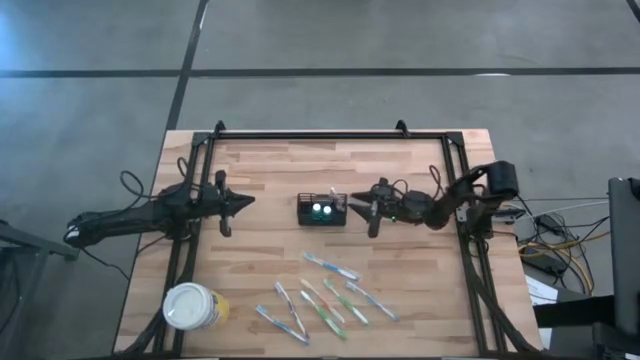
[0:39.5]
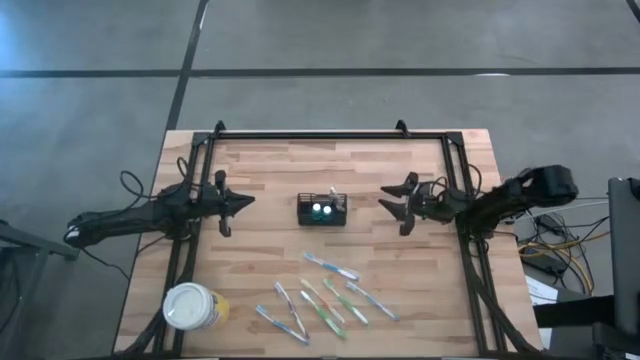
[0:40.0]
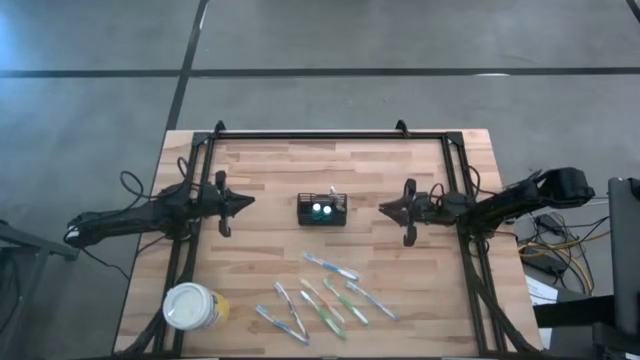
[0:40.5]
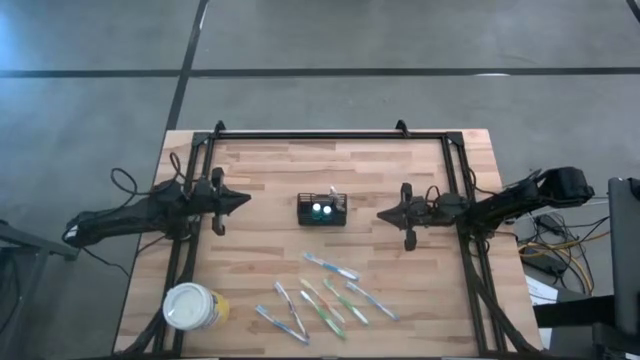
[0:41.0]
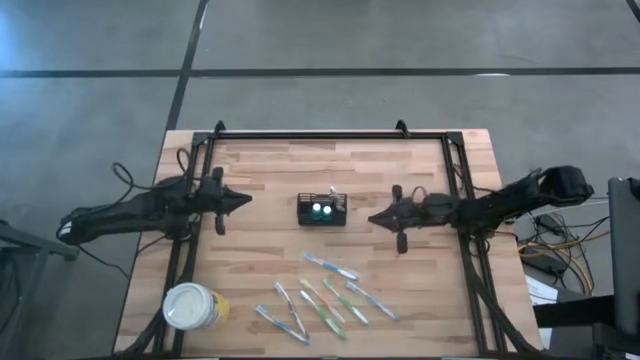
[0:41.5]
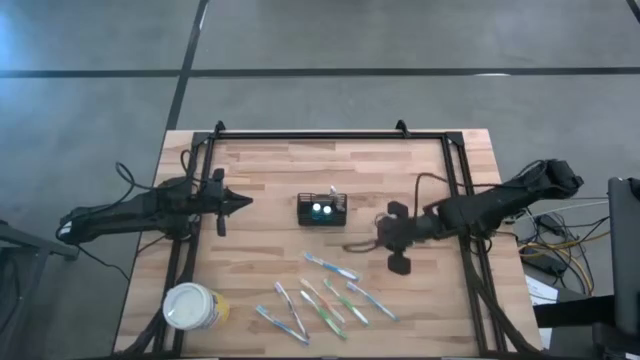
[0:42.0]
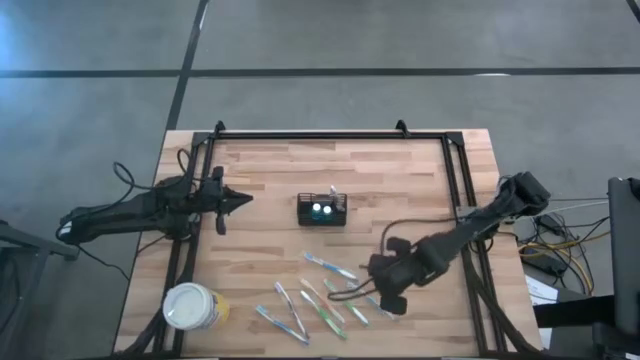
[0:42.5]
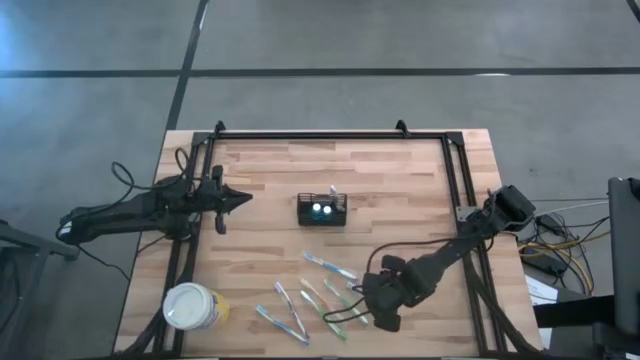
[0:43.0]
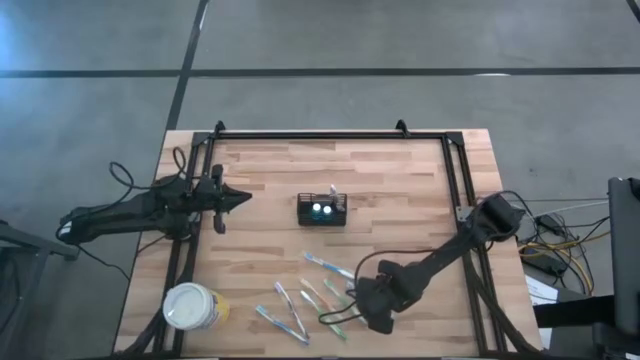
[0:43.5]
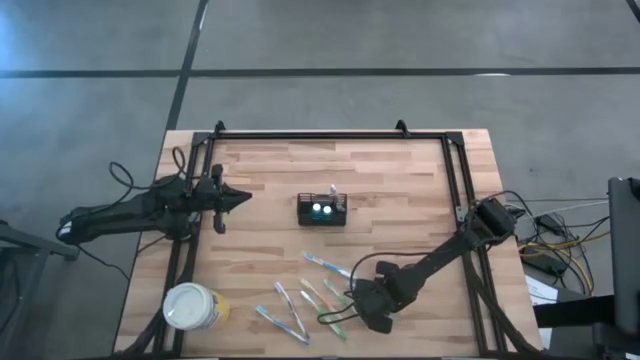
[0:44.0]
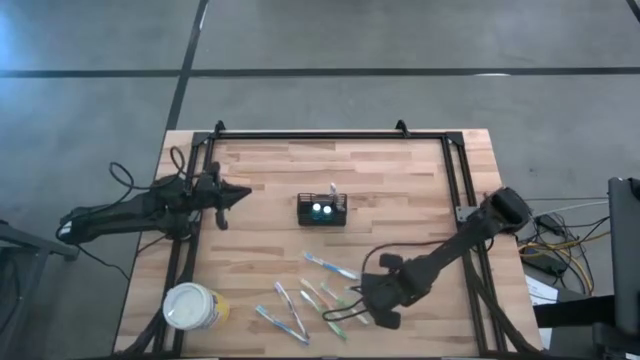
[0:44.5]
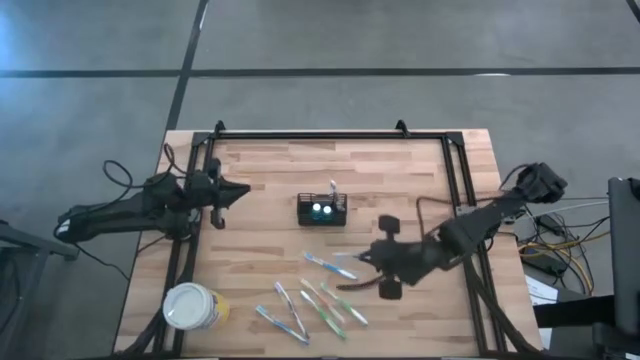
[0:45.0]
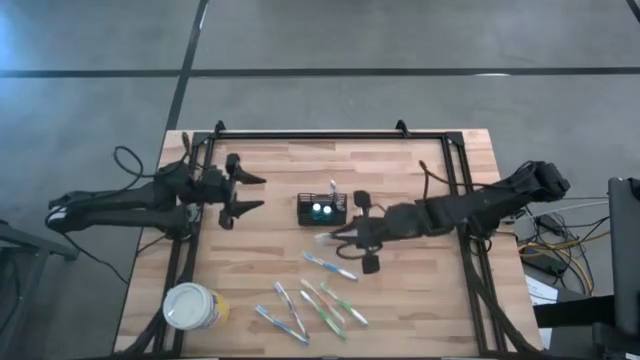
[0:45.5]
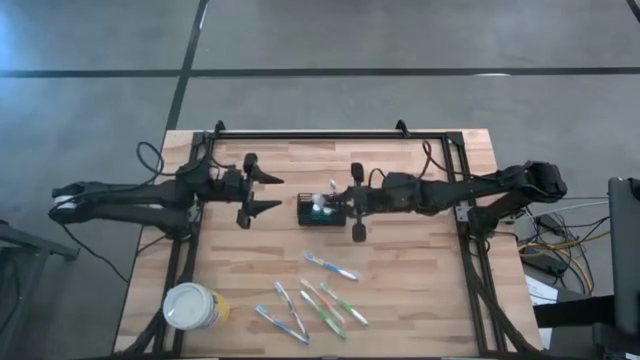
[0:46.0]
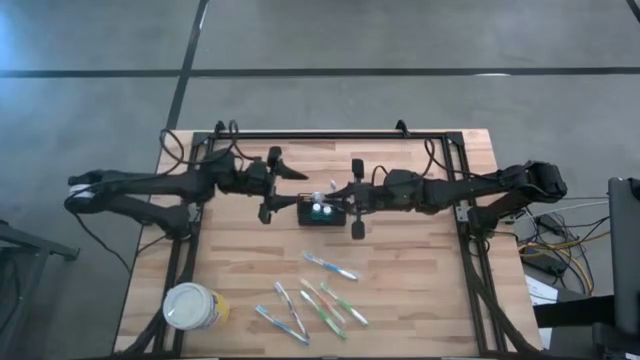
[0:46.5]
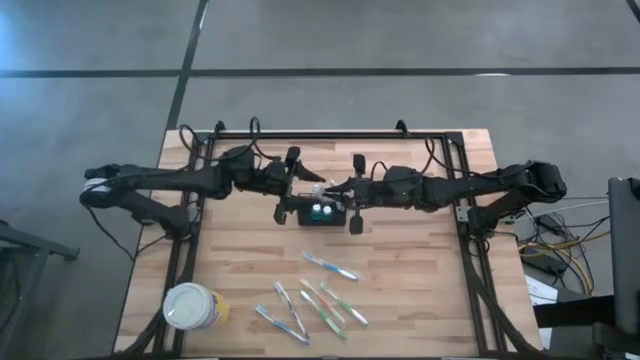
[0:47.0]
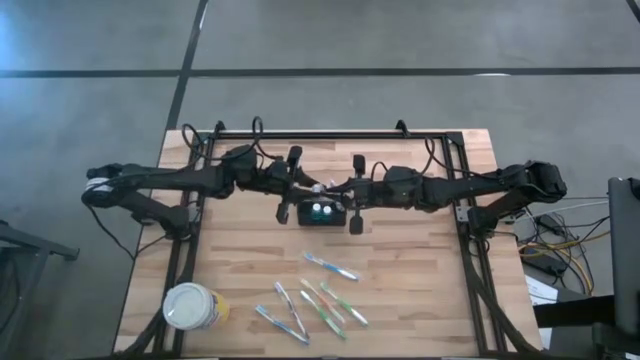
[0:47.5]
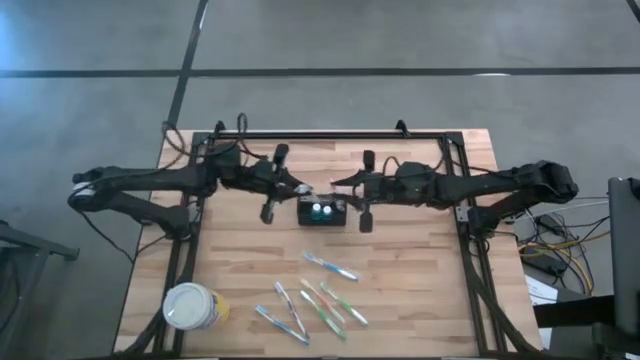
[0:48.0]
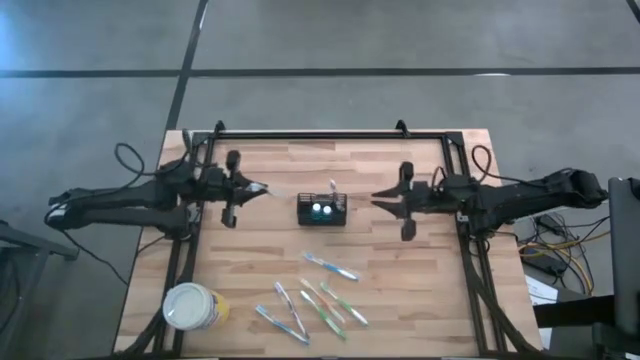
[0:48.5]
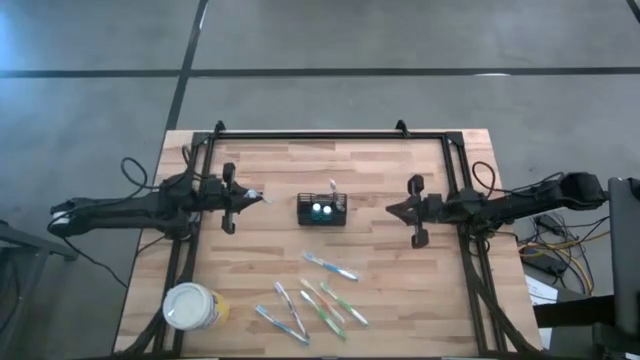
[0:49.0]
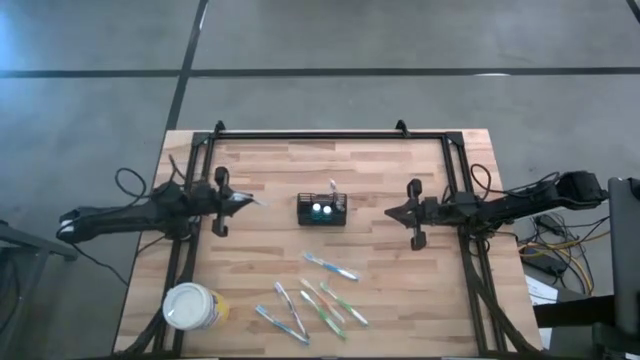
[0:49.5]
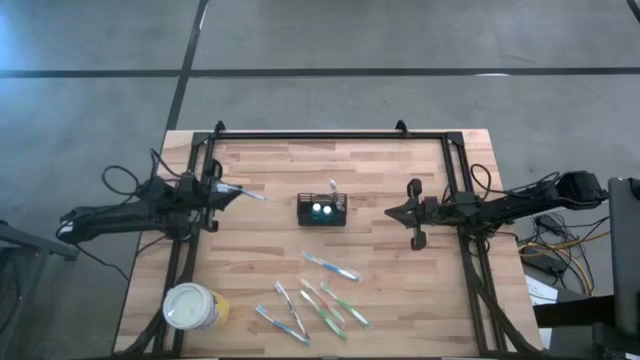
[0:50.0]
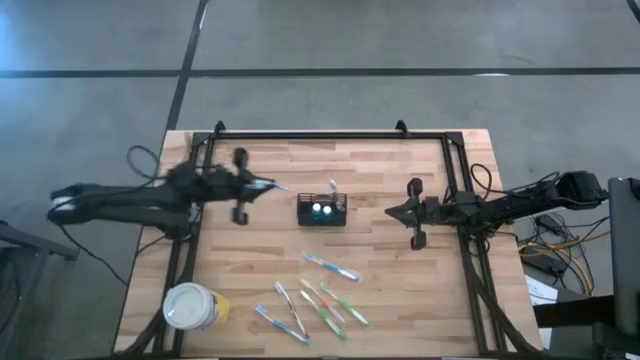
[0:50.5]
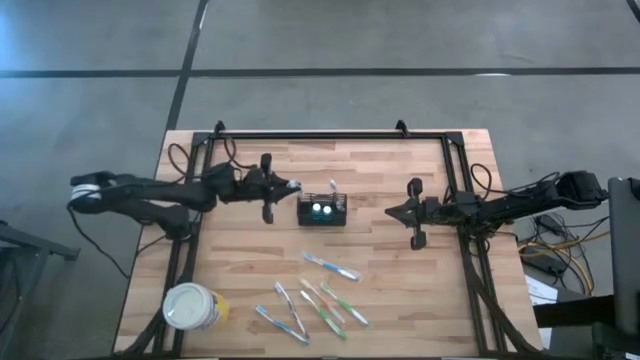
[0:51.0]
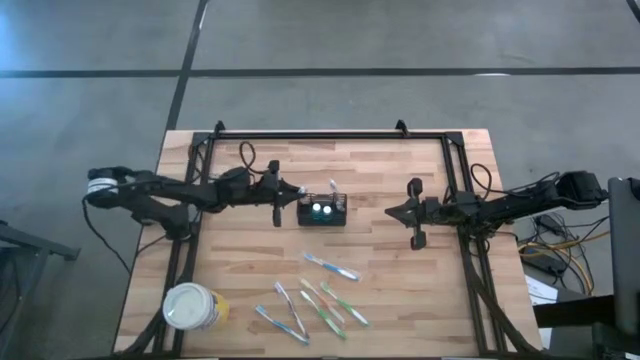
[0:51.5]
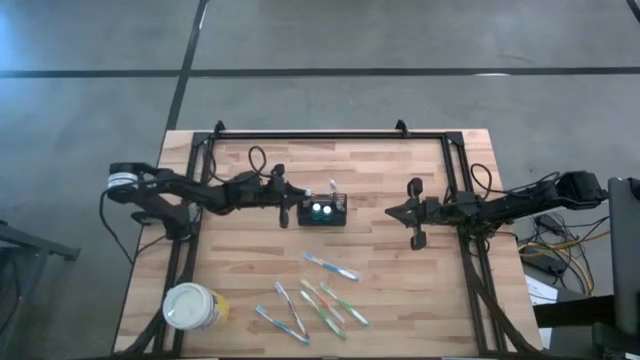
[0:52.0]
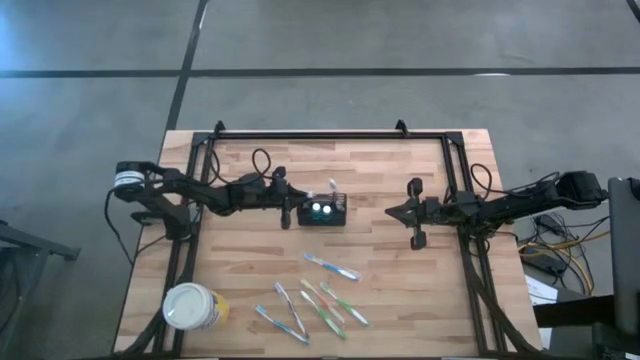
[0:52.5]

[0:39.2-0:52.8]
Task: Pick & Place toothbrushing station
Put the blue toothbrush into the black wire organizer

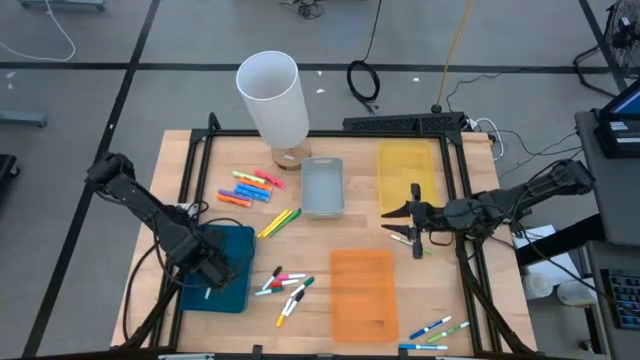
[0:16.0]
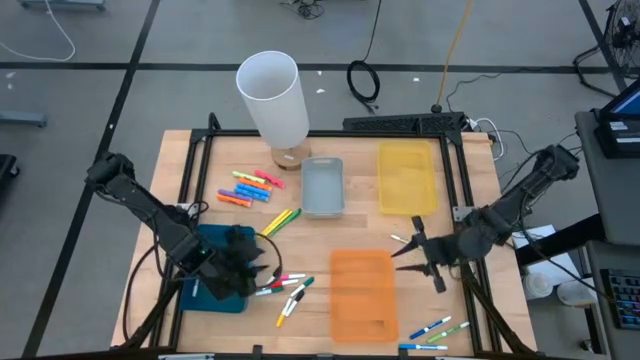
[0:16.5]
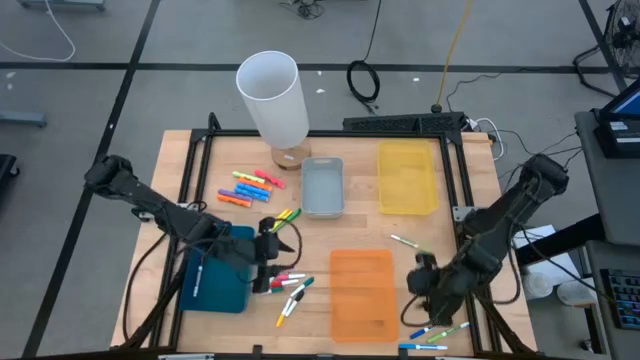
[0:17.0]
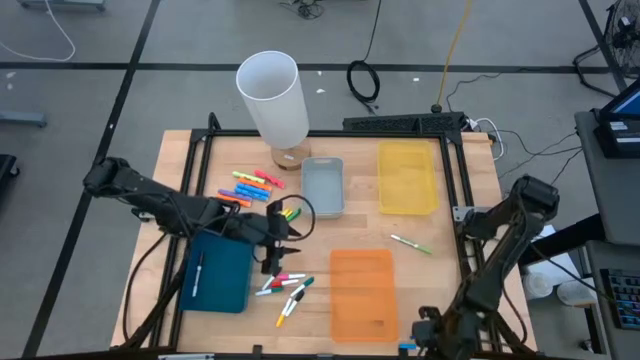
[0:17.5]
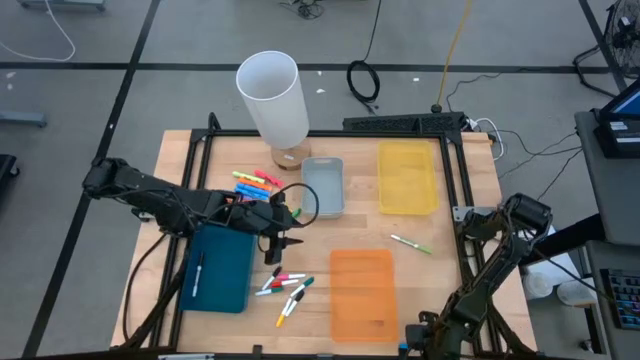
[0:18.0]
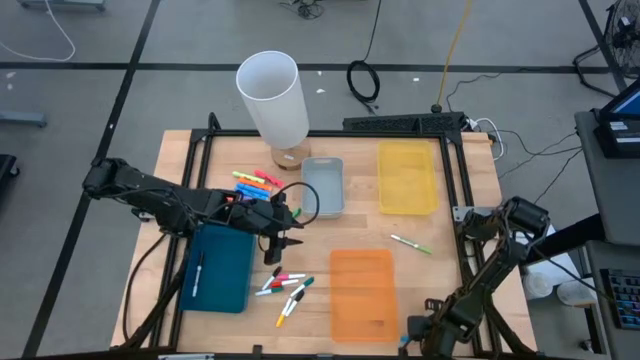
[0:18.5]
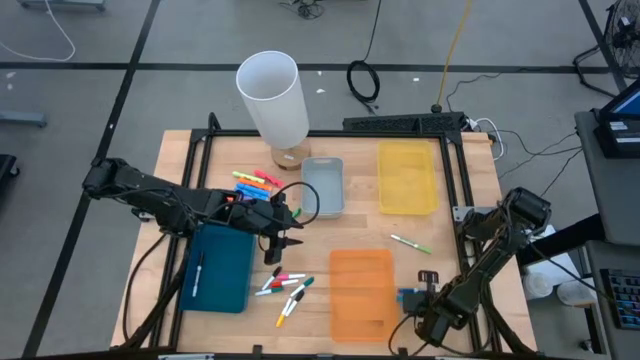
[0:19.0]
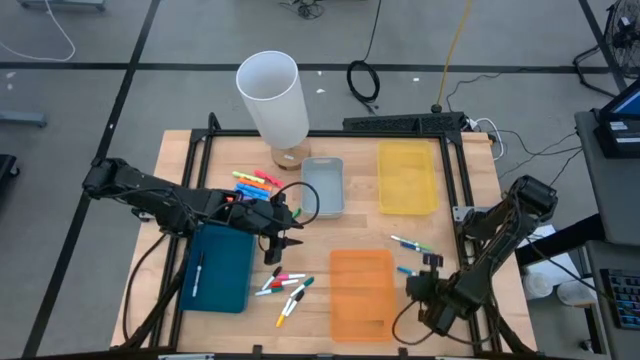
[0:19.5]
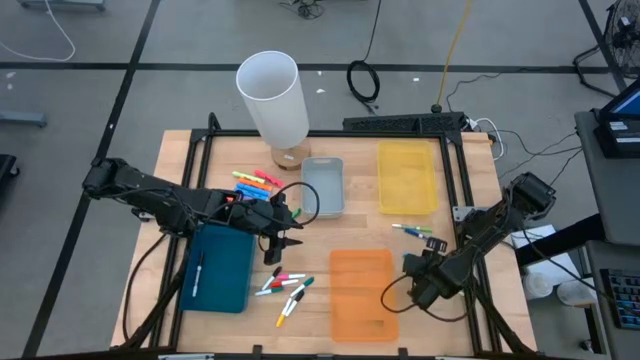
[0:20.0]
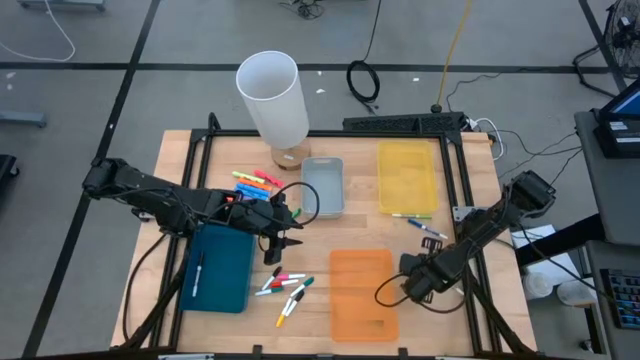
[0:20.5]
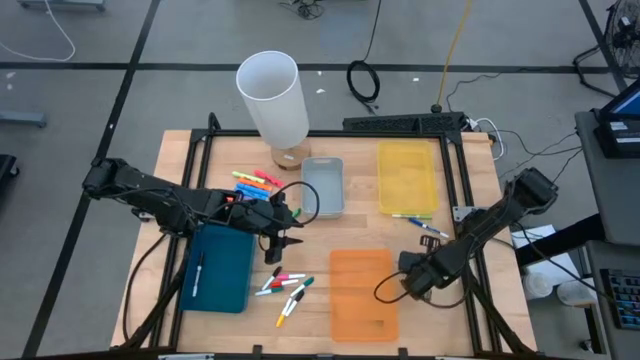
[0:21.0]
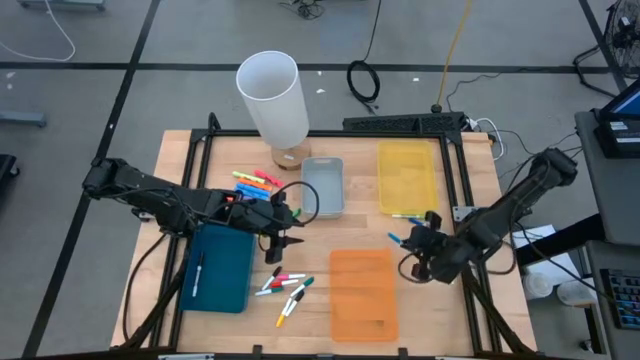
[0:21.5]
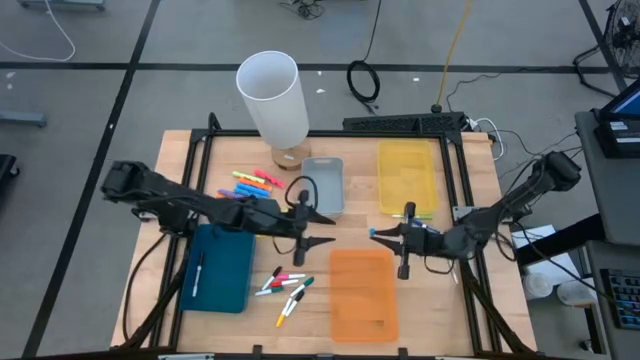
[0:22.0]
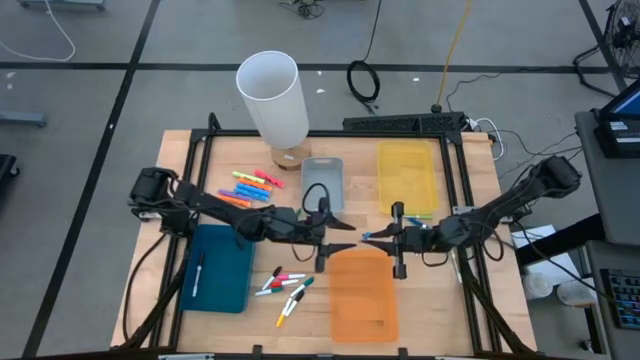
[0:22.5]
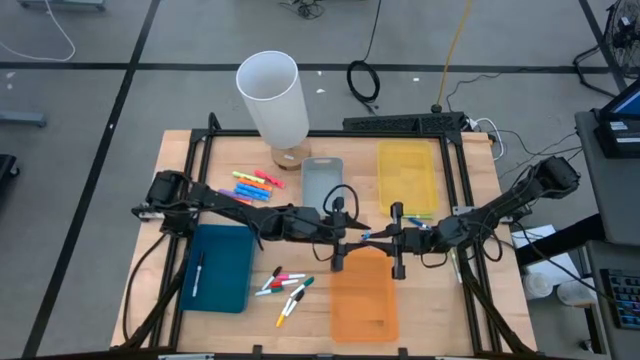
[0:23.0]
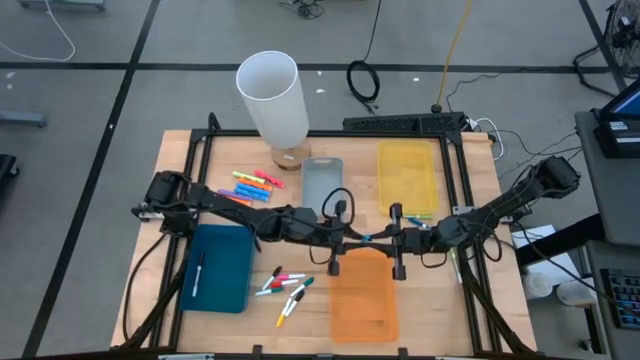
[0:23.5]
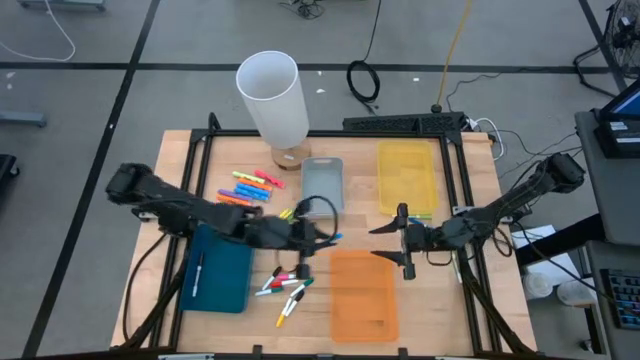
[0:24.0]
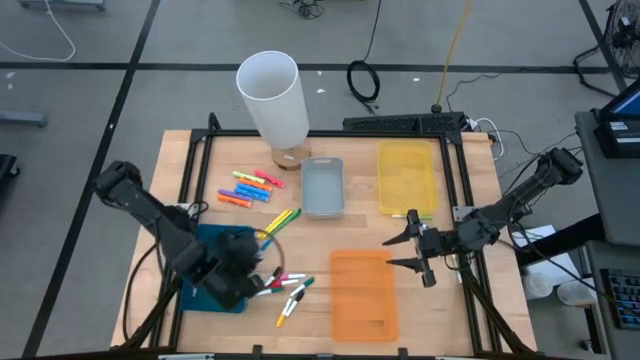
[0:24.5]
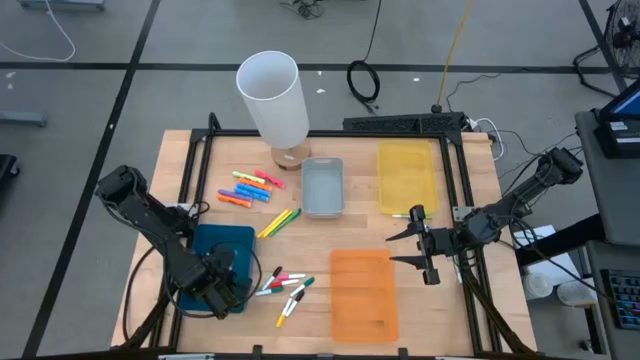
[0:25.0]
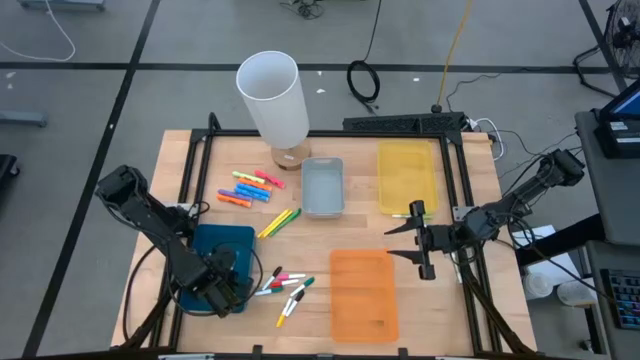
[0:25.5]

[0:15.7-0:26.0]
Task: Pick & Place Markers
Put the light blue marker pen into the blue bin
